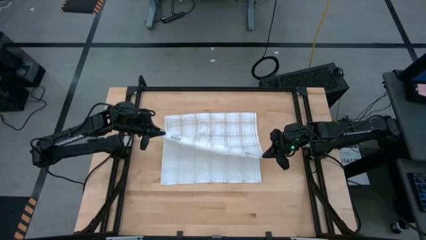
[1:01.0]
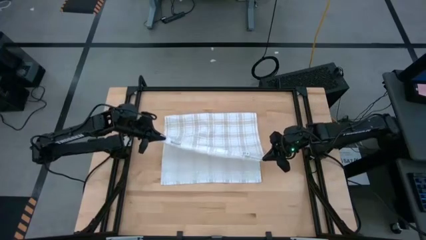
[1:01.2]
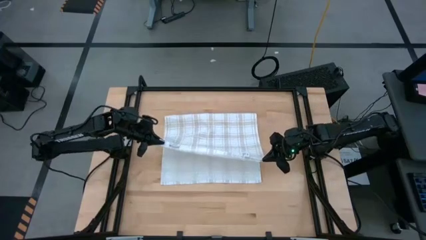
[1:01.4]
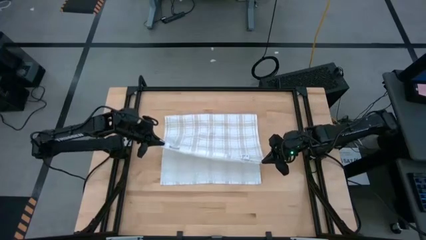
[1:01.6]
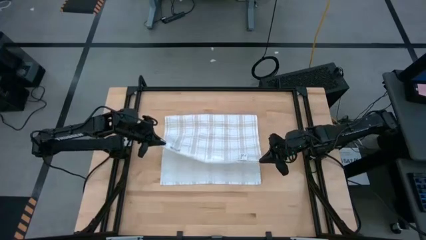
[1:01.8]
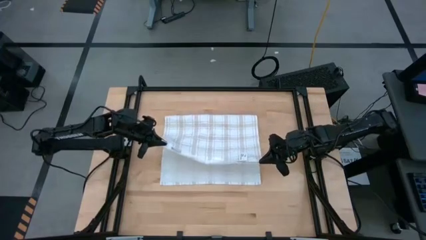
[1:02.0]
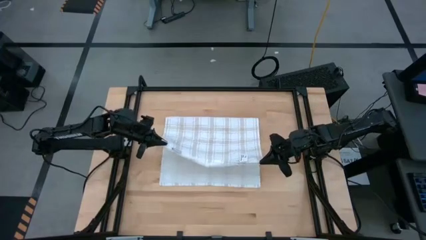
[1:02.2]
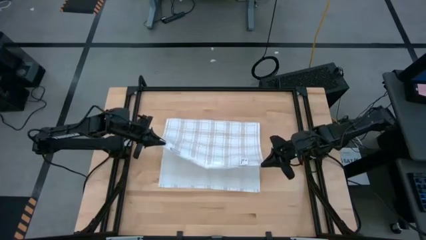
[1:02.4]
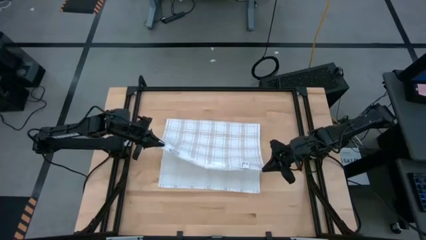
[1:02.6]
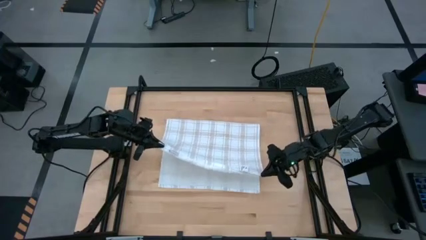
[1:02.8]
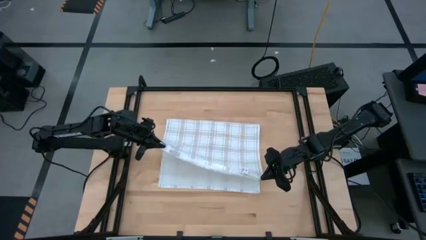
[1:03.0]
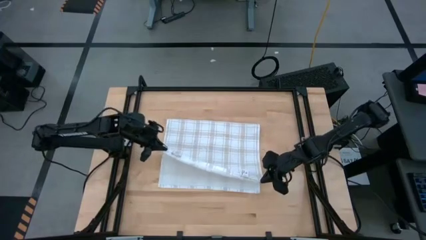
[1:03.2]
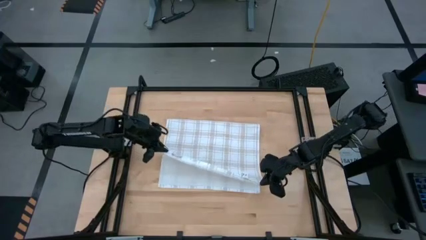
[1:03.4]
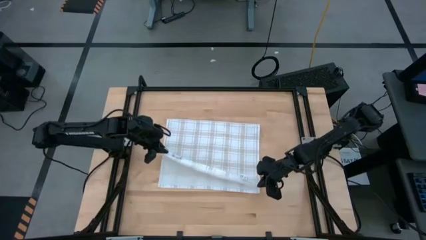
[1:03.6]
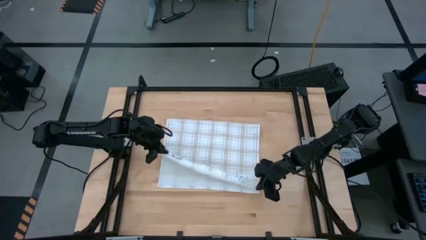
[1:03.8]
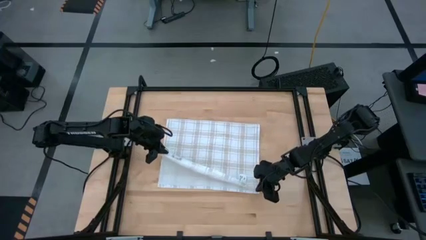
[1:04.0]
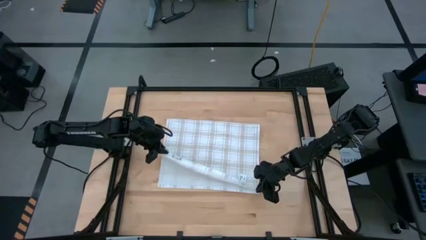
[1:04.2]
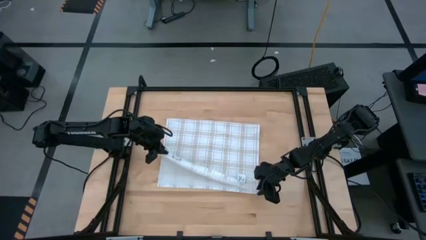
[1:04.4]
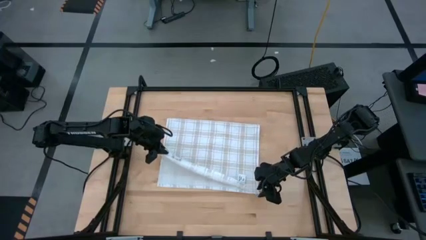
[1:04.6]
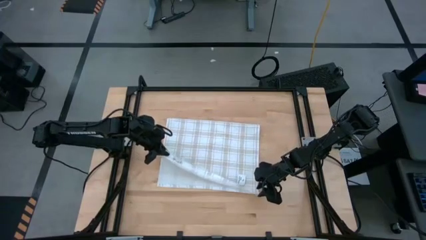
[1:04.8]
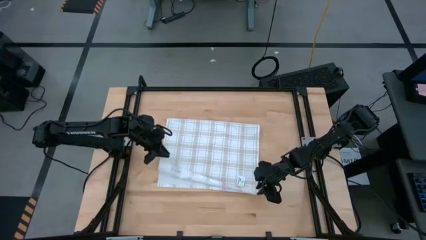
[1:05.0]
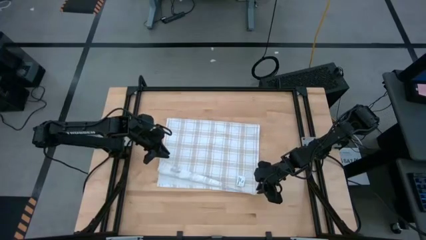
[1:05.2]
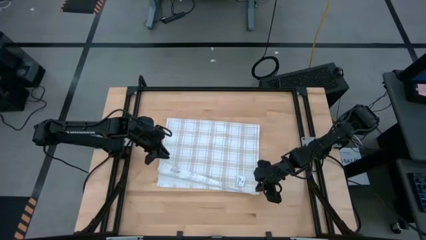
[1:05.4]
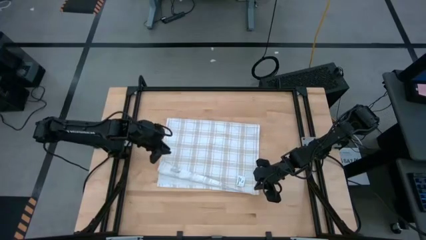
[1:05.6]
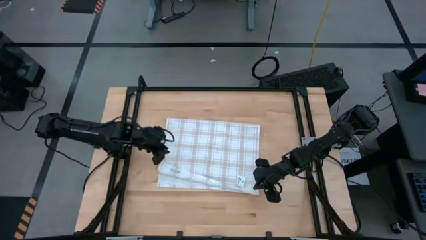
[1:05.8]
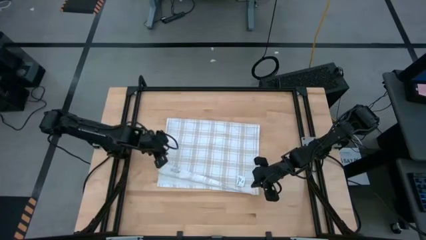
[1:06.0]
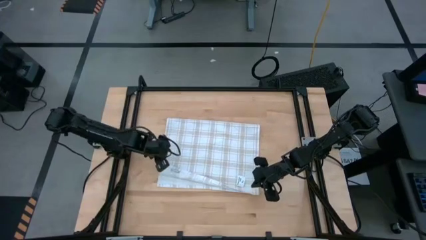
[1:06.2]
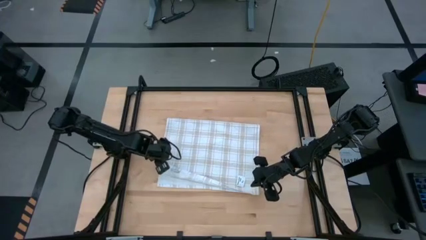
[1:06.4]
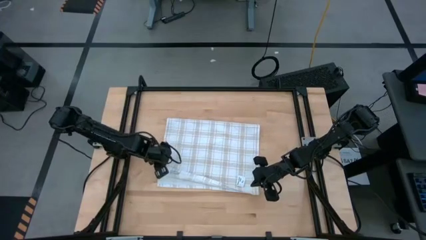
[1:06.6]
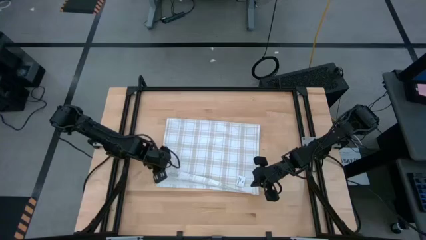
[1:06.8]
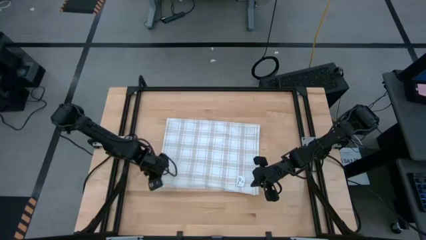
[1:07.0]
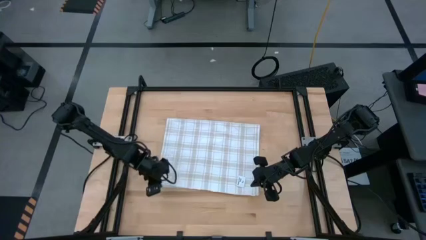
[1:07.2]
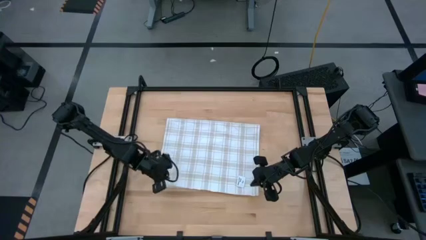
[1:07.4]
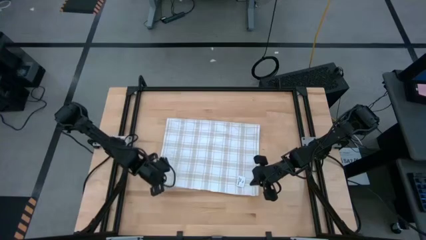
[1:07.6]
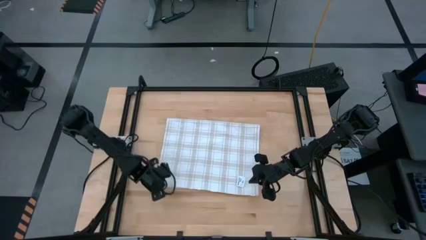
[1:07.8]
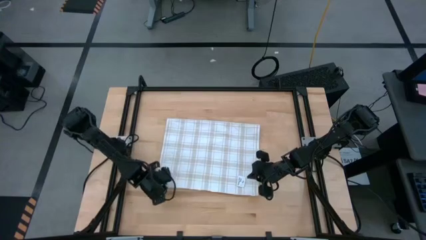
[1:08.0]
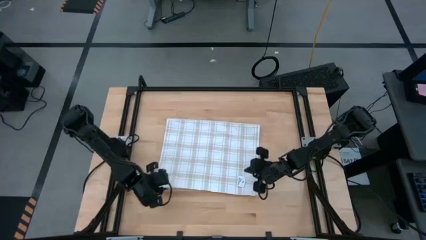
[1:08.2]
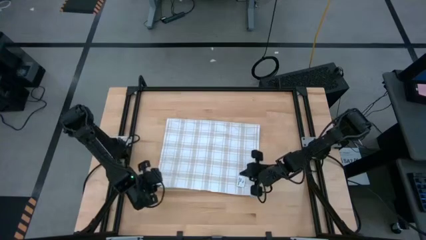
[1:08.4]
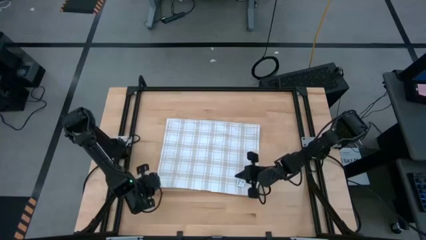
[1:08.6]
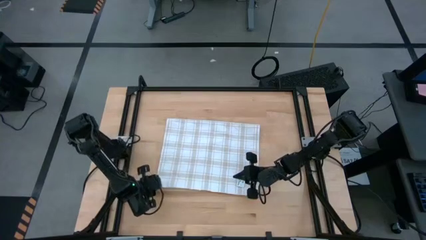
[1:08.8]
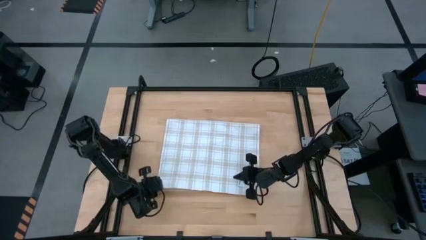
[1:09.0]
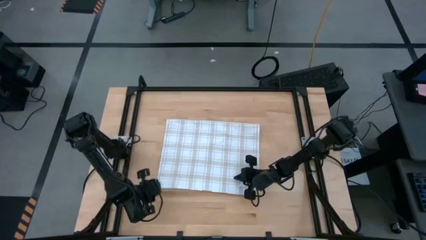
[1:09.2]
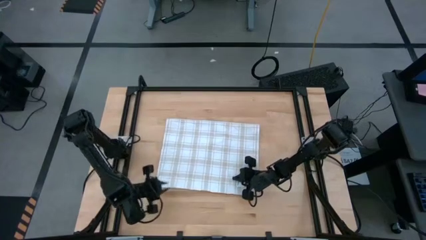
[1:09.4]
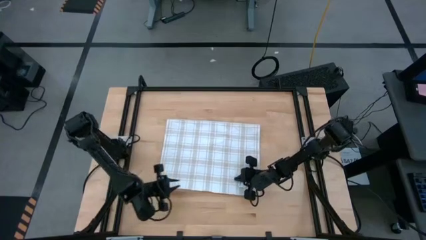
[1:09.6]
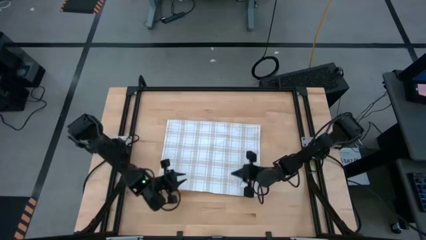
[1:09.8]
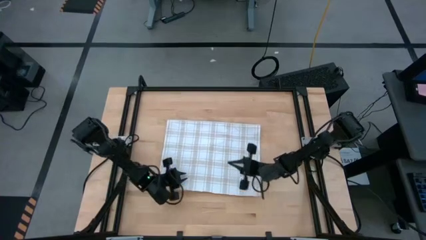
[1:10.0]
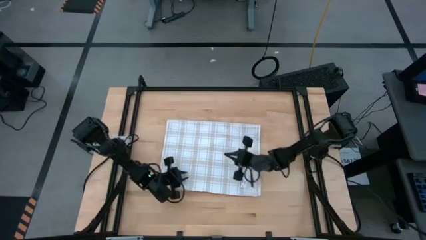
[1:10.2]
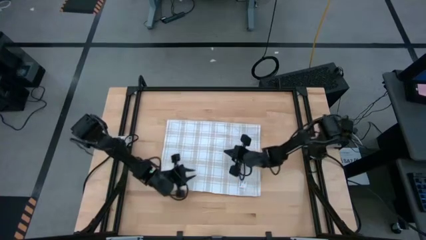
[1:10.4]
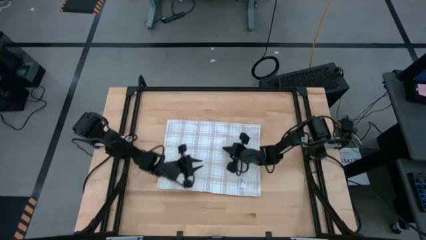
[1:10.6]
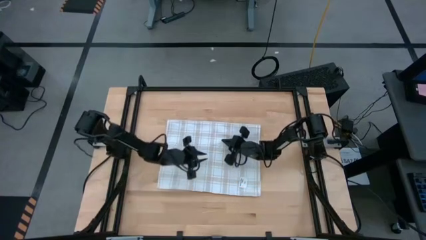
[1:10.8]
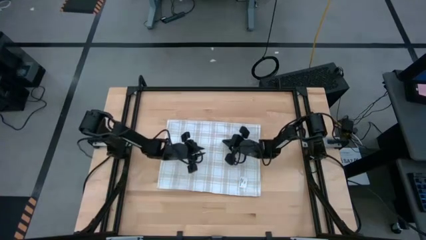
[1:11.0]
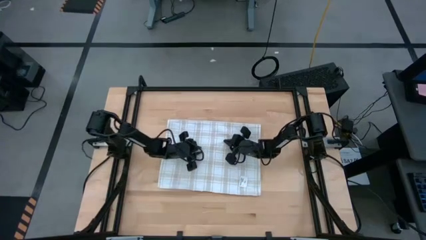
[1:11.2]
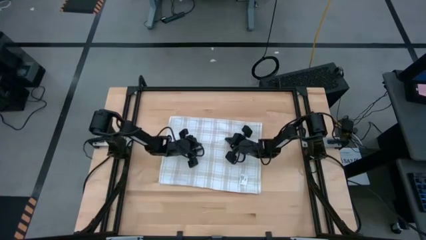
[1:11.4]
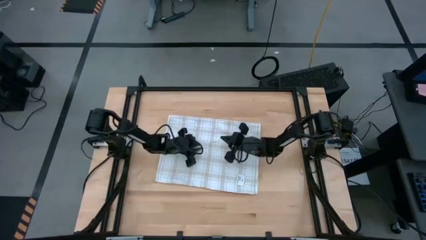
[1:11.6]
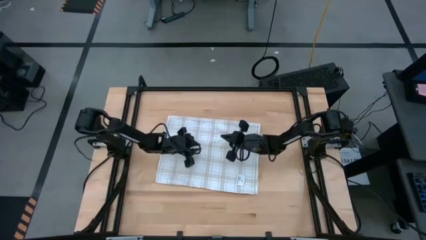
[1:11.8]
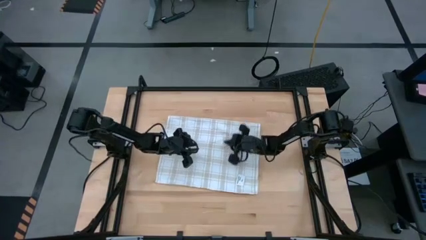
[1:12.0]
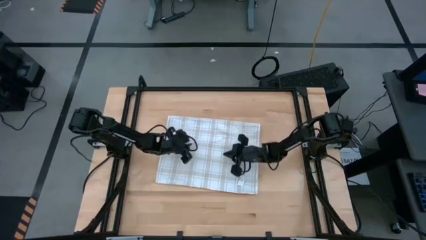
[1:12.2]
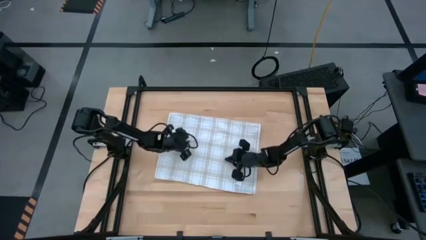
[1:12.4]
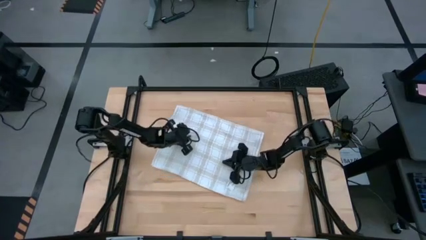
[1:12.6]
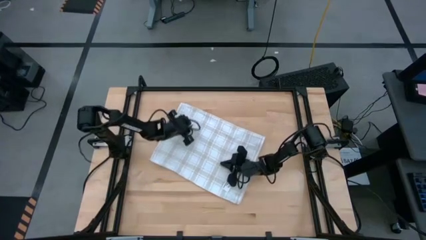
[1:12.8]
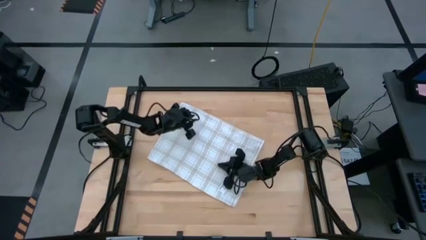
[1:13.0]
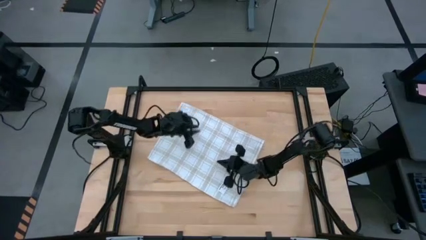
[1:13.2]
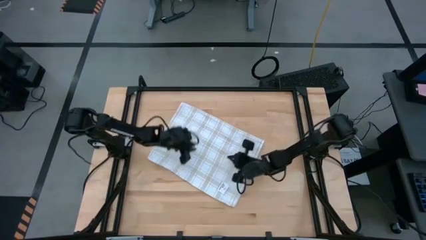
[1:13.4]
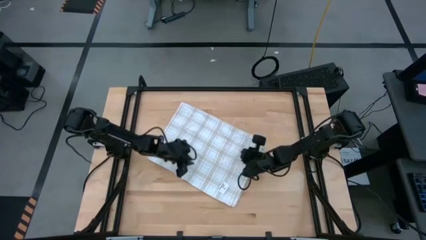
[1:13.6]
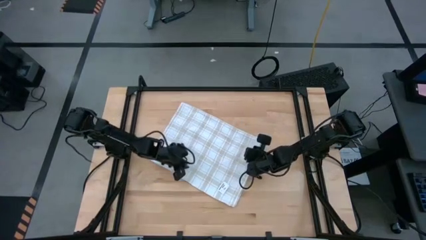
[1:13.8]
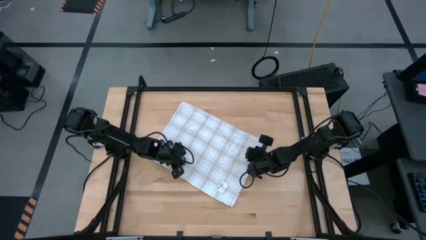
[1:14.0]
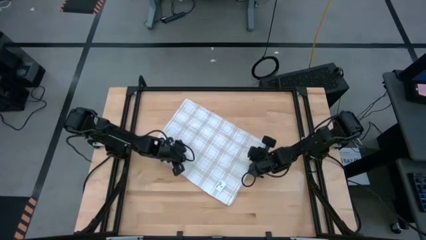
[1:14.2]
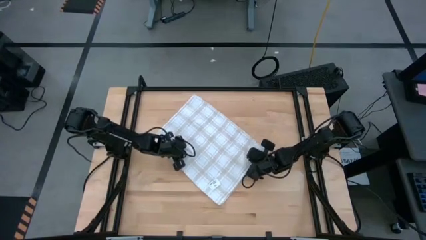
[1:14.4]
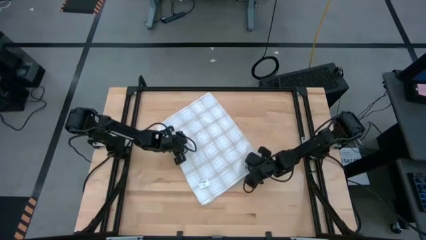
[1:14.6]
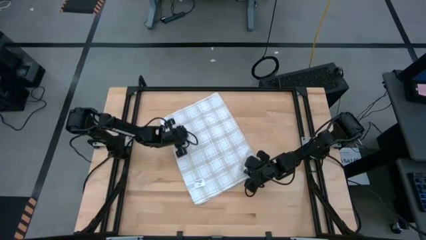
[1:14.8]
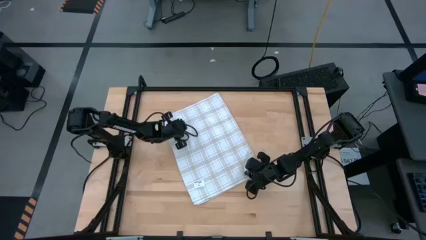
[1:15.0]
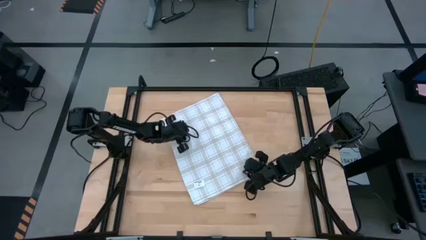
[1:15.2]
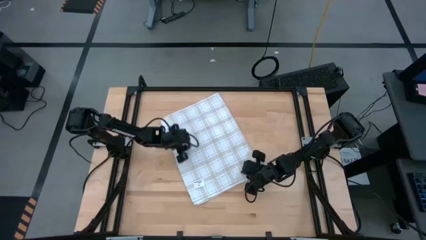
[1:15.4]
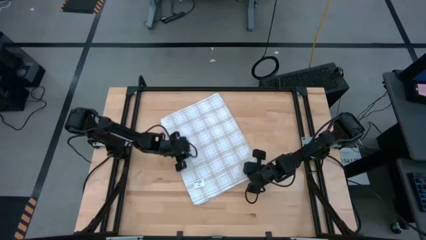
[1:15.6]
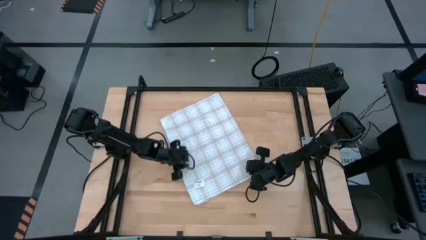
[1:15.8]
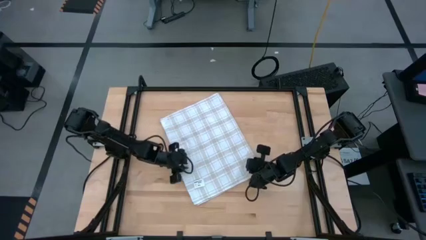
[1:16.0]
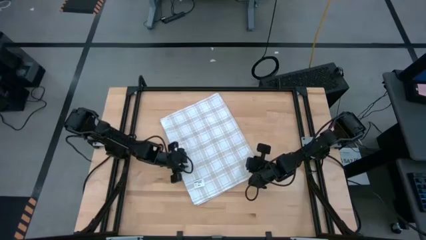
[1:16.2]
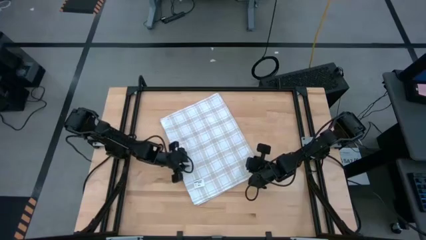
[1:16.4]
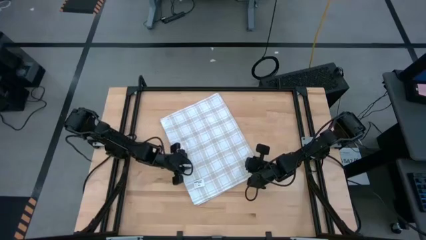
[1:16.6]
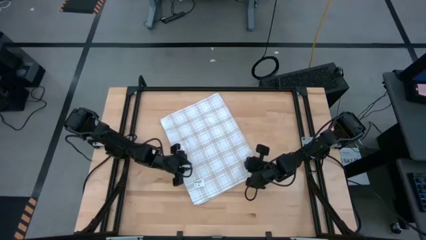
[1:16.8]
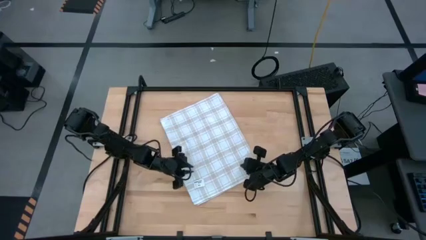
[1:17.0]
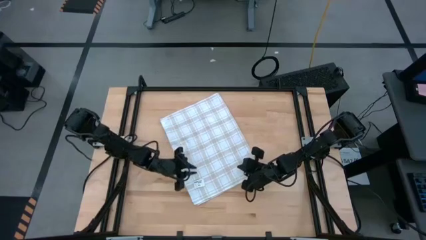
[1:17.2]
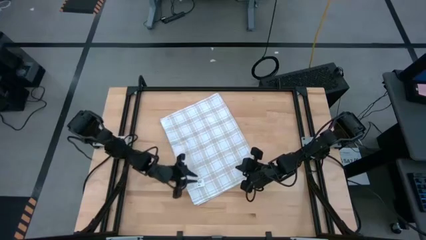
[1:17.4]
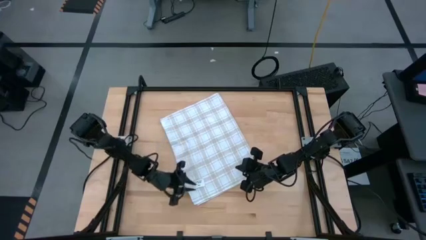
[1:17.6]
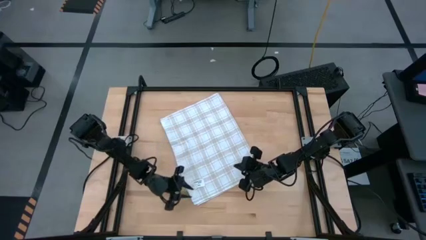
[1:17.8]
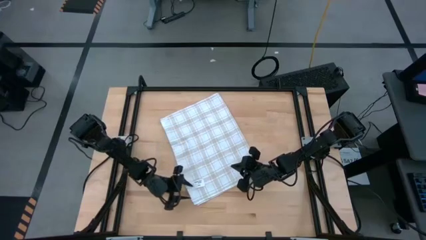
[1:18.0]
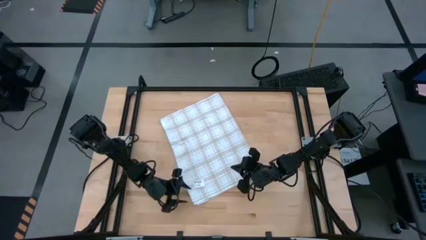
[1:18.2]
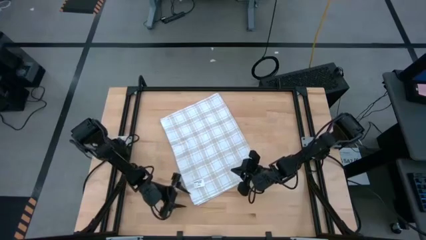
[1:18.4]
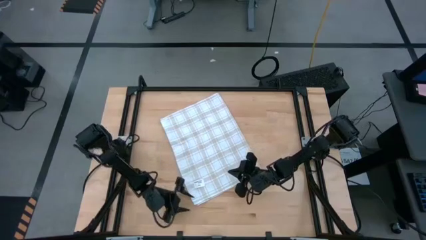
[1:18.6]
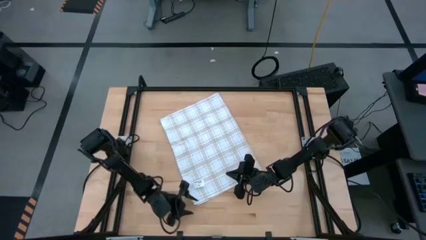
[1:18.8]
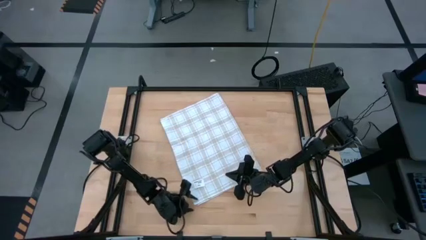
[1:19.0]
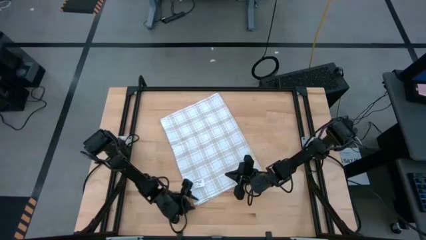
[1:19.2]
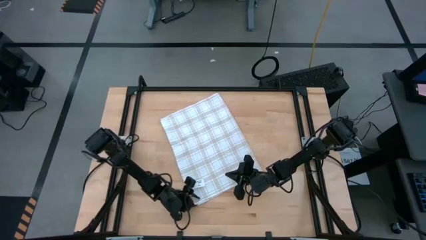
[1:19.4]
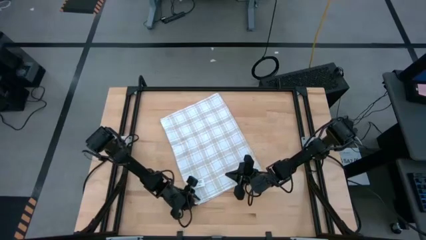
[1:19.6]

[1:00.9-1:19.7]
Task: Roll towel
Roll the white kitchen towel
